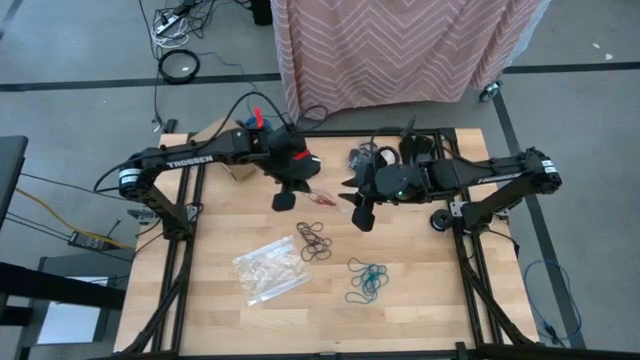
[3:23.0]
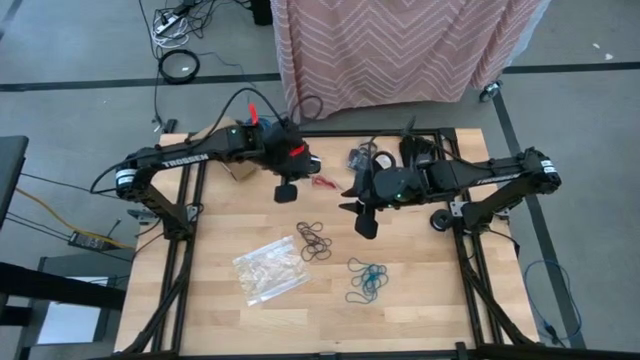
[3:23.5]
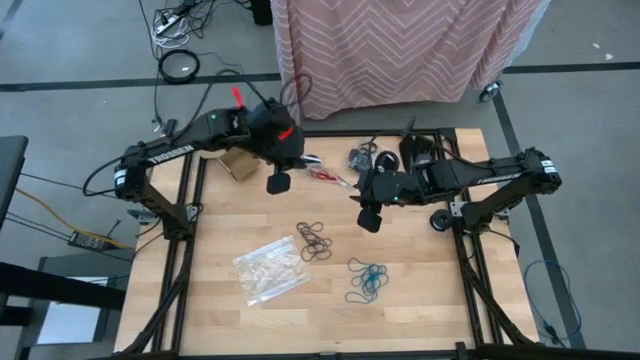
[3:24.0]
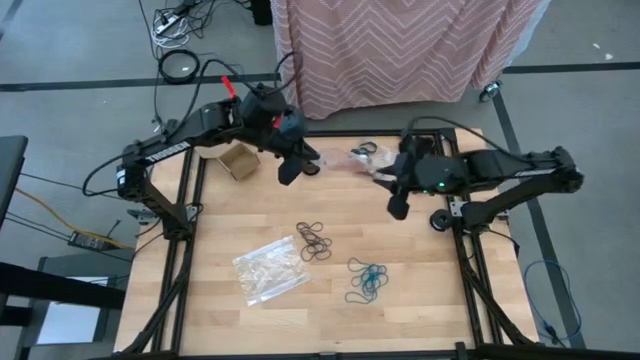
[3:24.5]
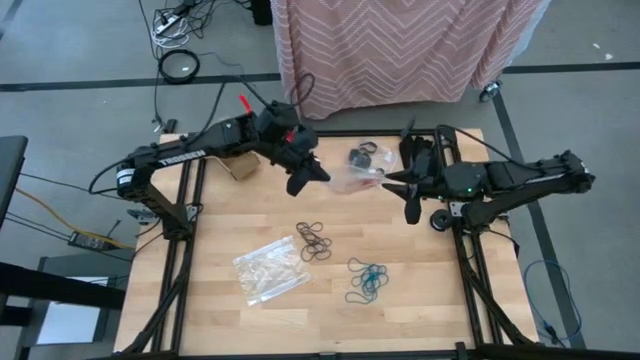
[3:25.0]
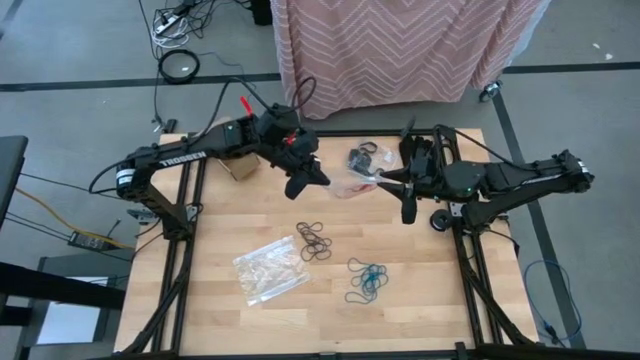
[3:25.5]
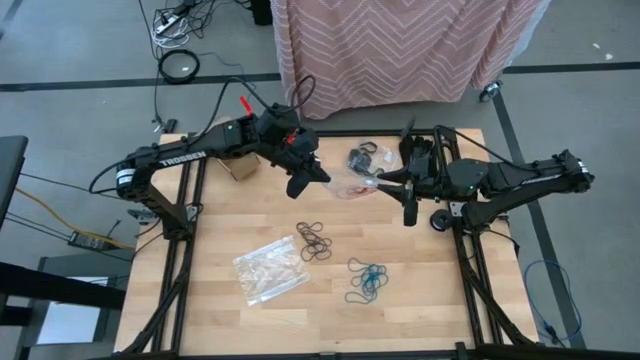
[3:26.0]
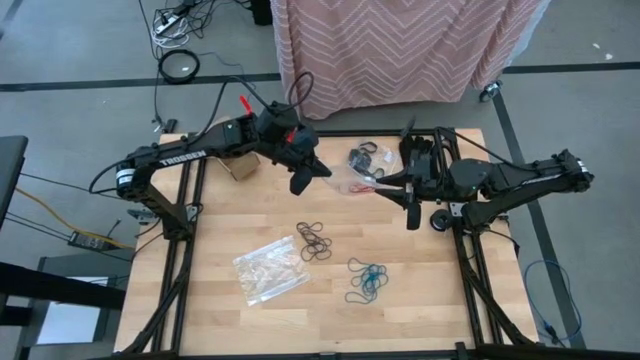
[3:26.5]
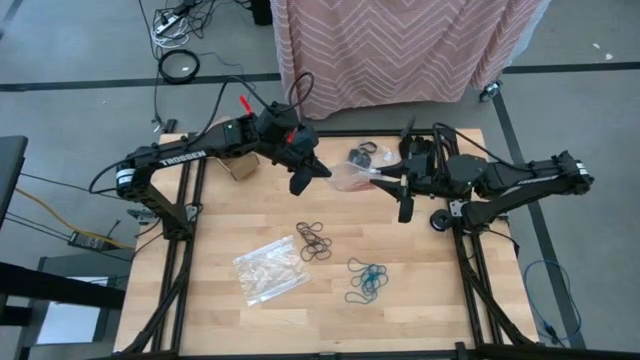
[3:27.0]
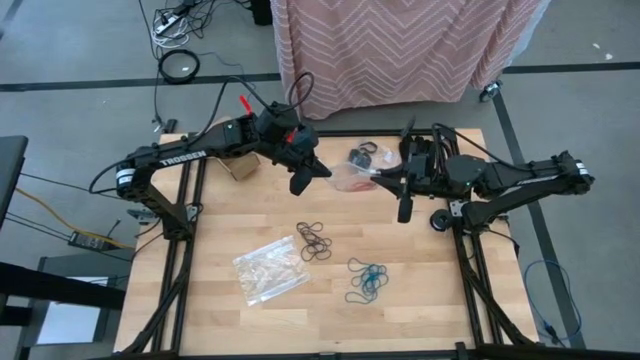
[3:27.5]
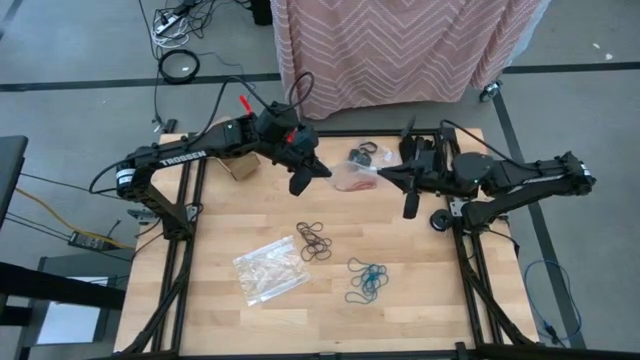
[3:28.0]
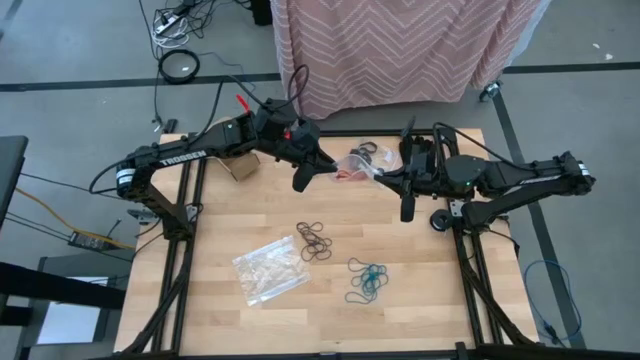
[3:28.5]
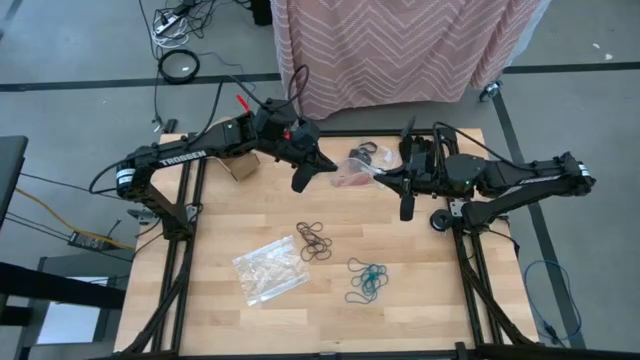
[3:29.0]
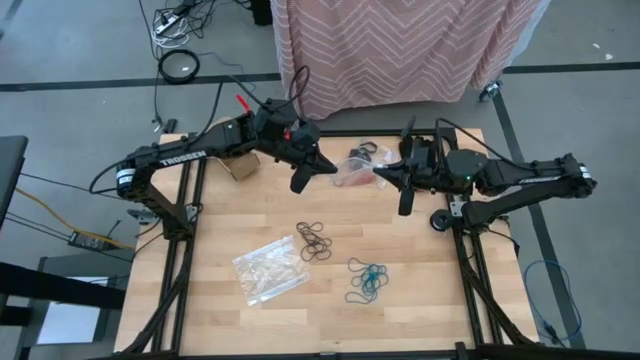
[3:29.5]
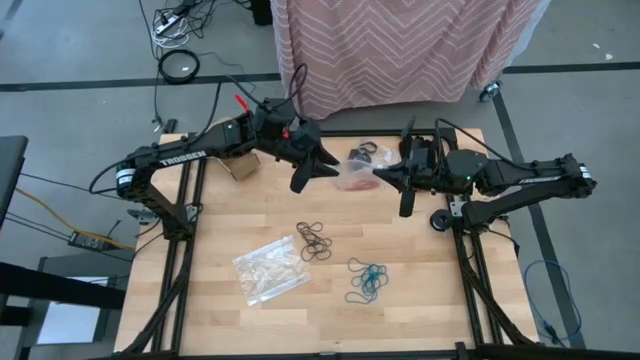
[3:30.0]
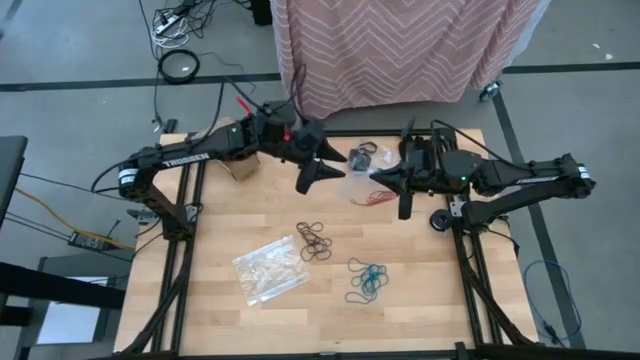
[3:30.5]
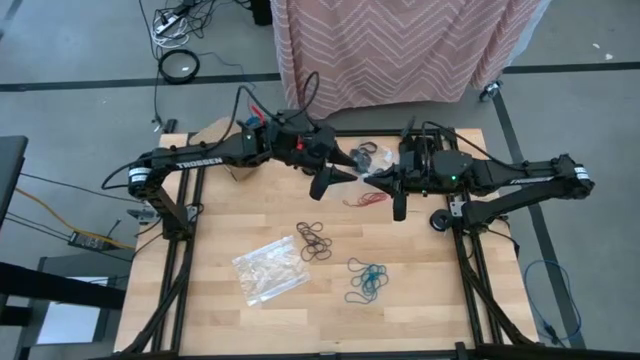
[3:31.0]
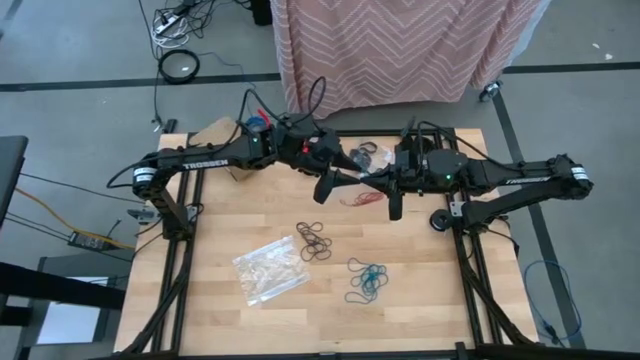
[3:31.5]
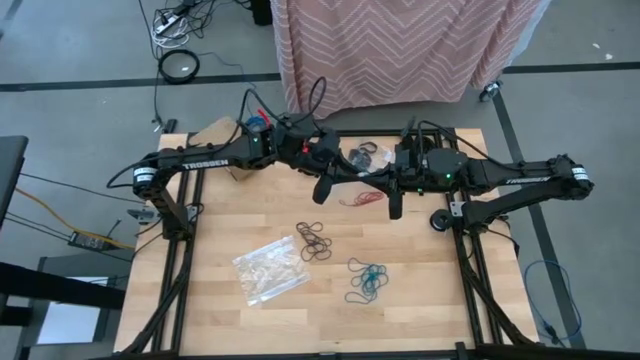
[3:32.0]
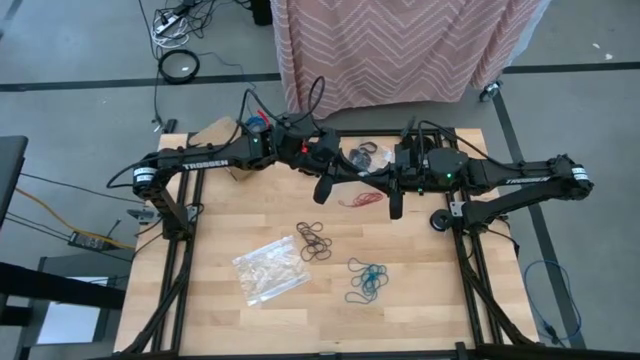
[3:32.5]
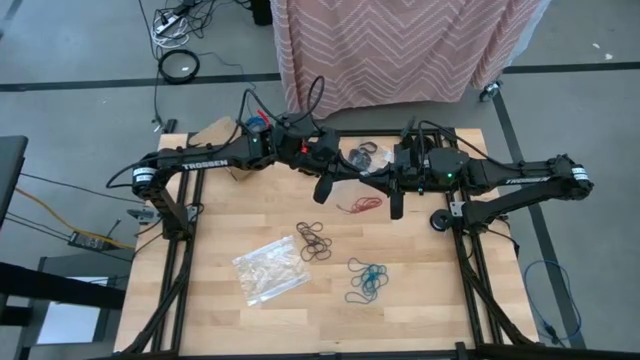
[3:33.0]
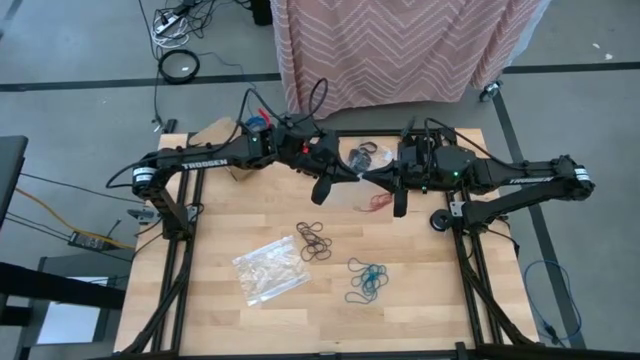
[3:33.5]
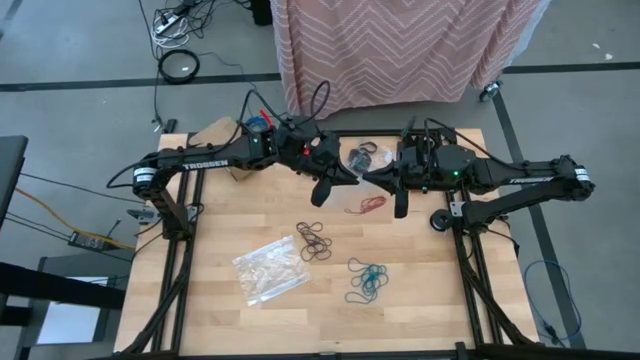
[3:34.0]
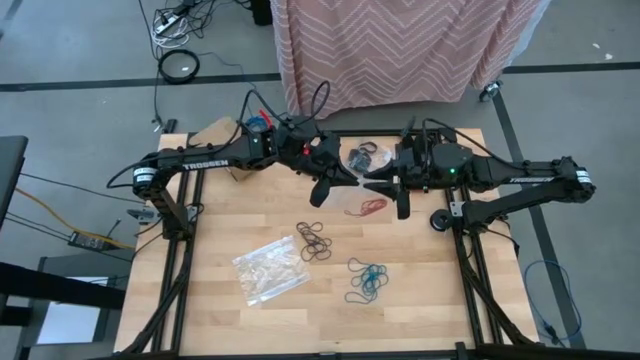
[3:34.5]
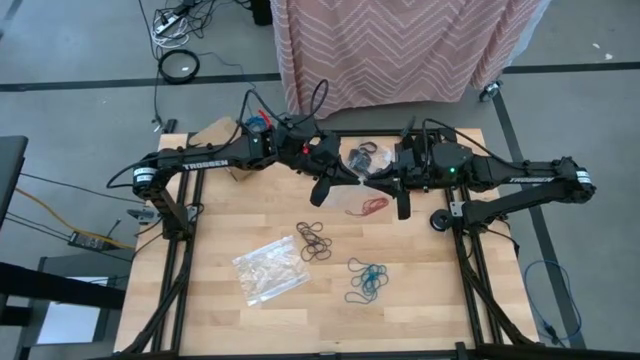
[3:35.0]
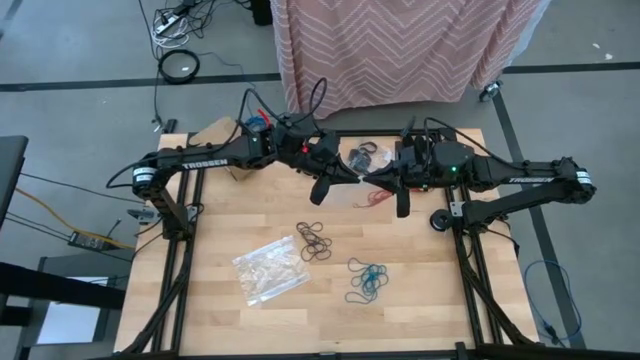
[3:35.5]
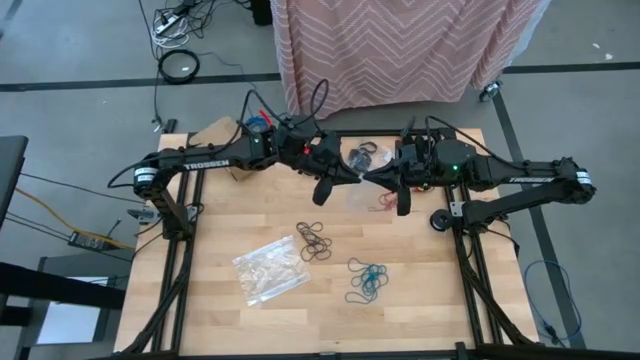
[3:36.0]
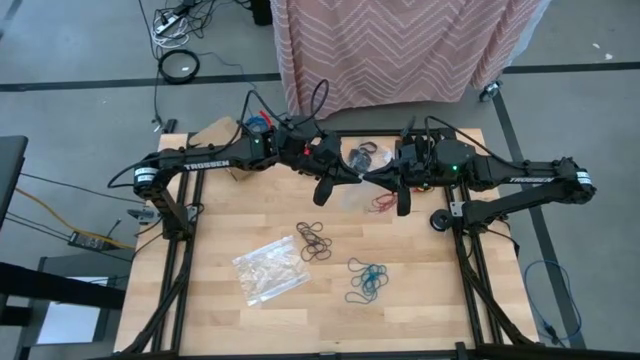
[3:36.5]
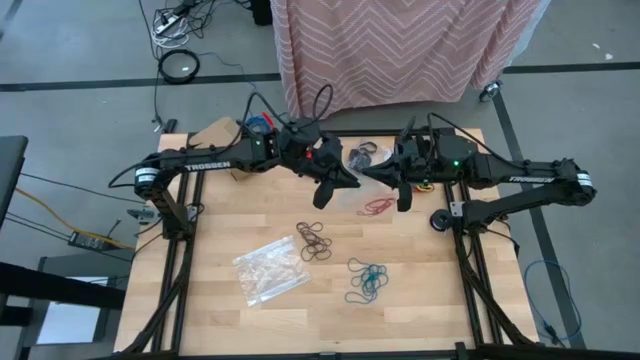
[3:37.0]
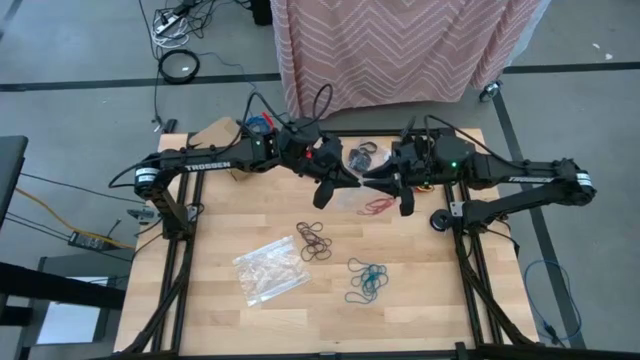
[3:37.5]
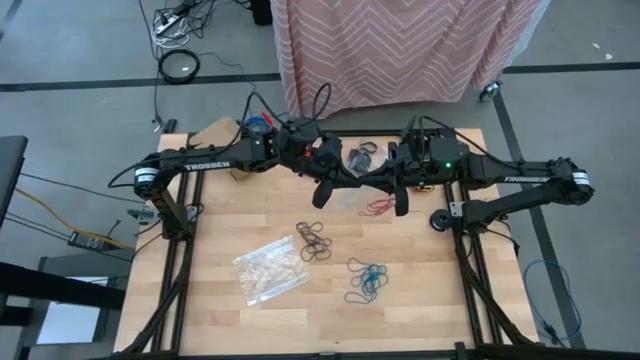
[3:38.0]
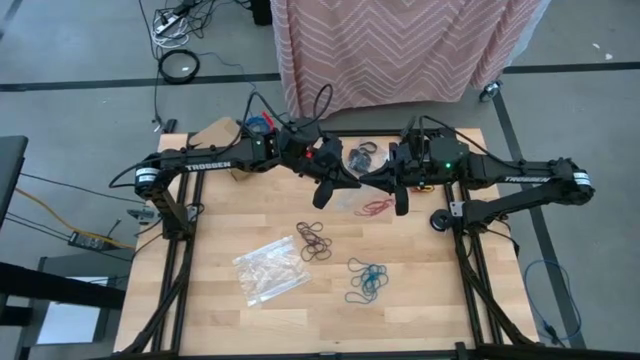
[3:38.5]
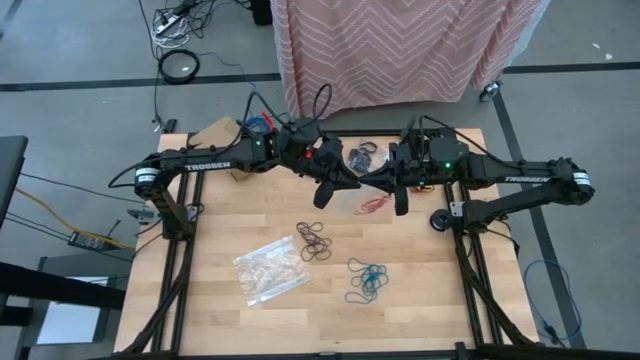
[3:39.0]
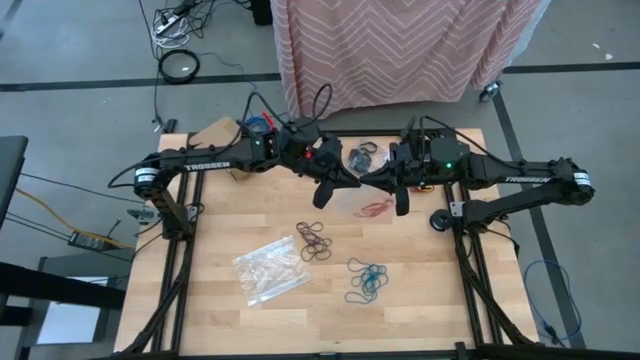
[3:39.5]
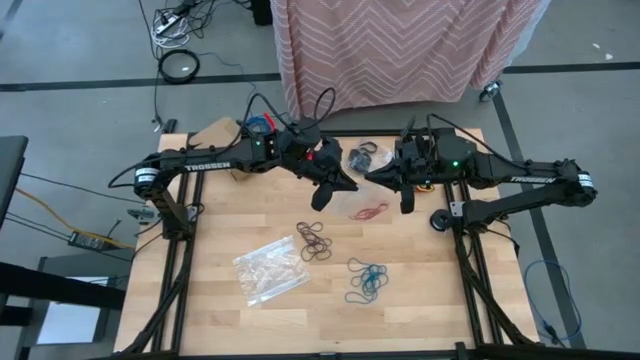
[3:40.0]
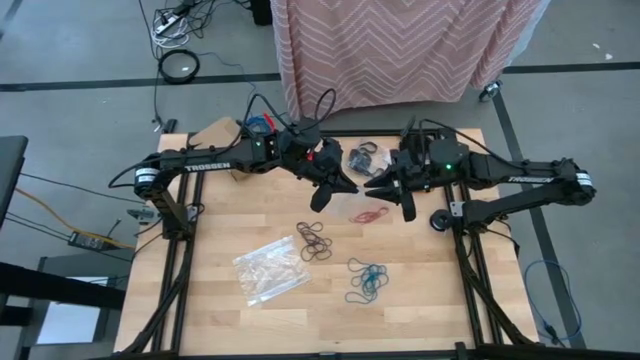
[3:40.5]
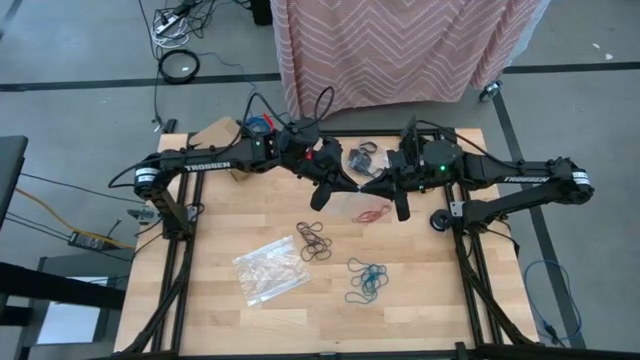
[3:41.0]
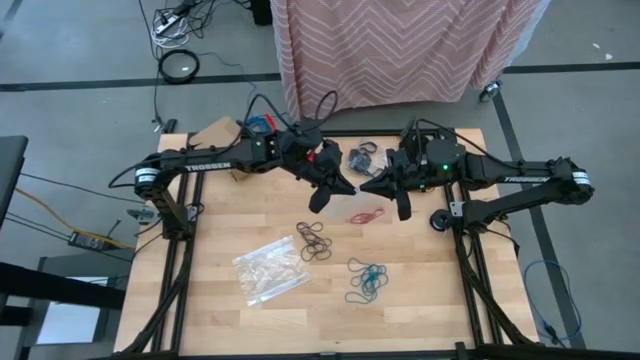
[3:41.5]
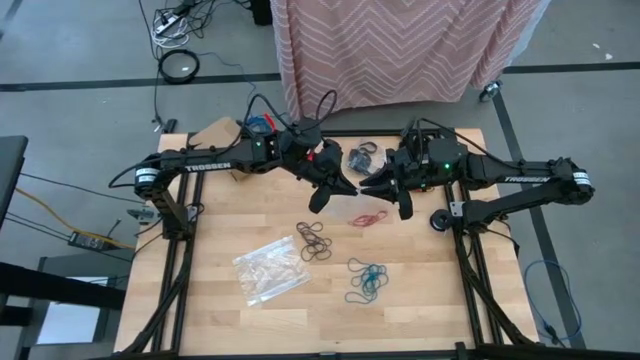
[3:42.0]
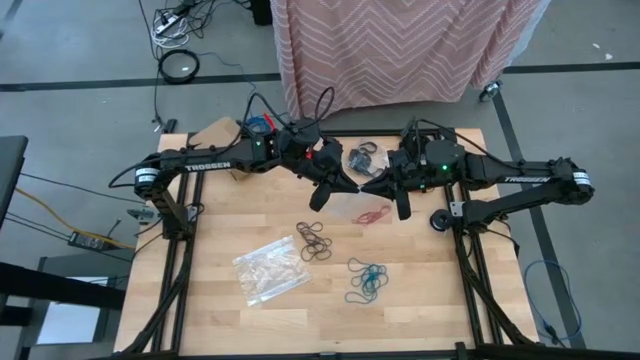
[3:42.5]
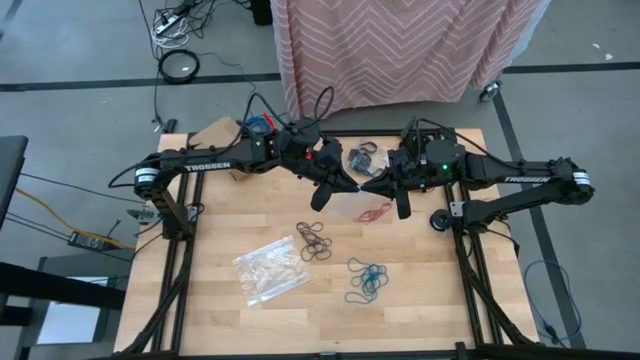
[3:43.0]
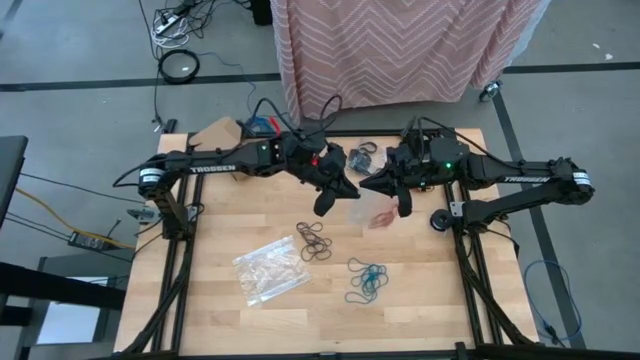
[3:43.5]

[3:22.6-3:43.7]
Task: Sort rubber bands
Close the transparent zip bag

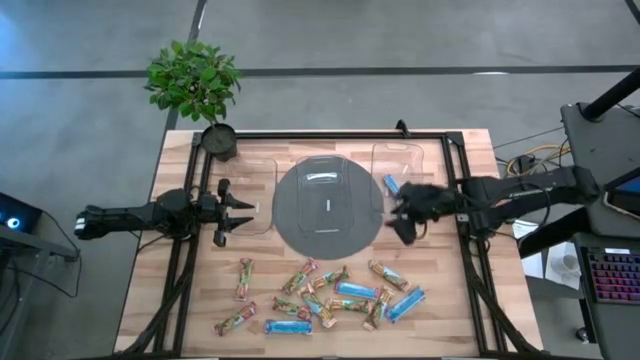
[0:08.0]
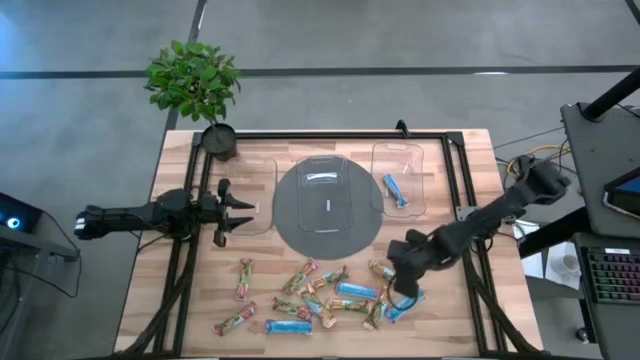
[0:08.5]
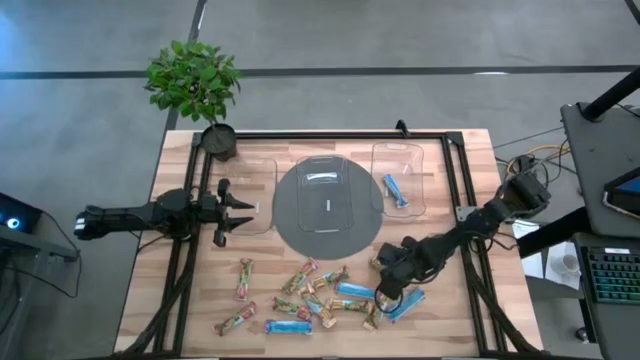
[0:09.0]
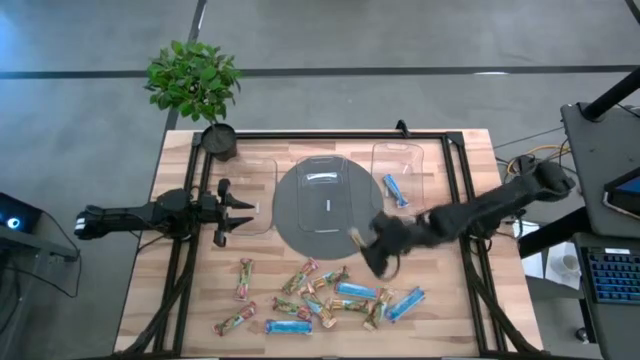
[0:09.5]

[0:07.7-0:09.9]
Task: Pick and place Granola Bars by type
Put the yellow granola bar into the middle transparent bin
